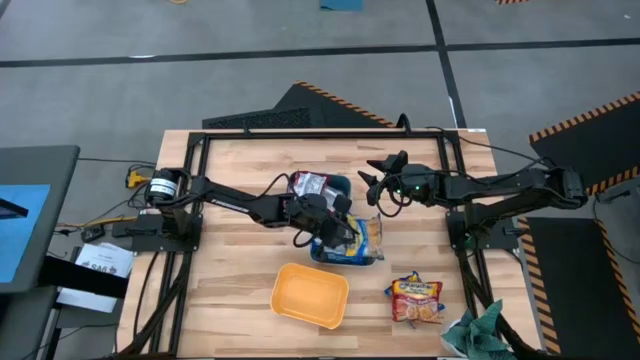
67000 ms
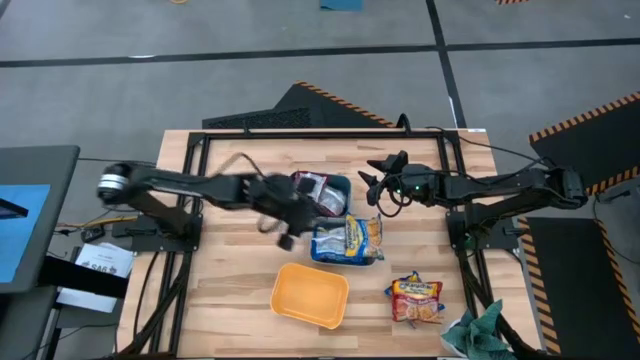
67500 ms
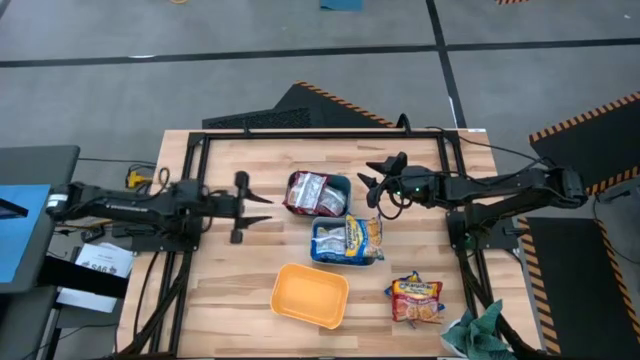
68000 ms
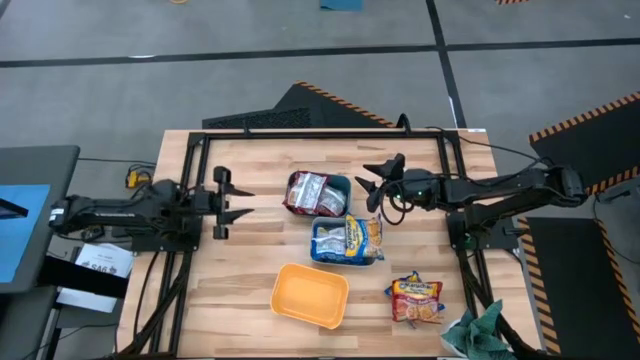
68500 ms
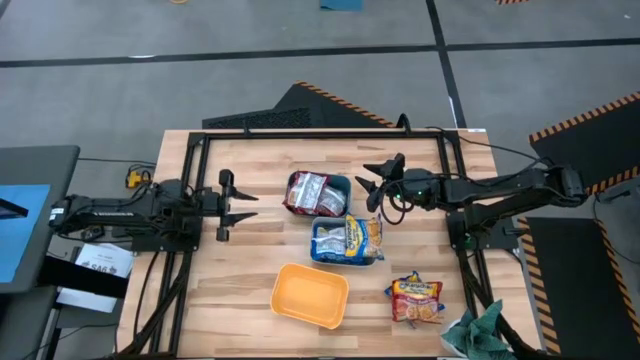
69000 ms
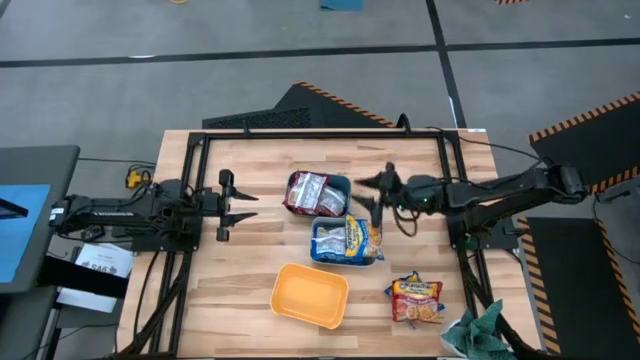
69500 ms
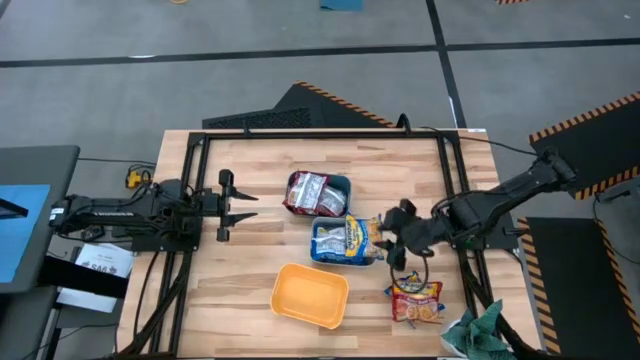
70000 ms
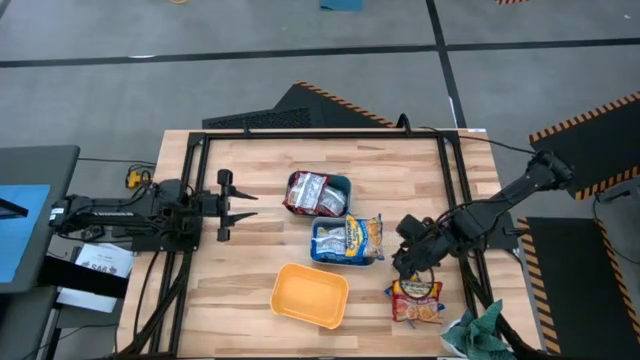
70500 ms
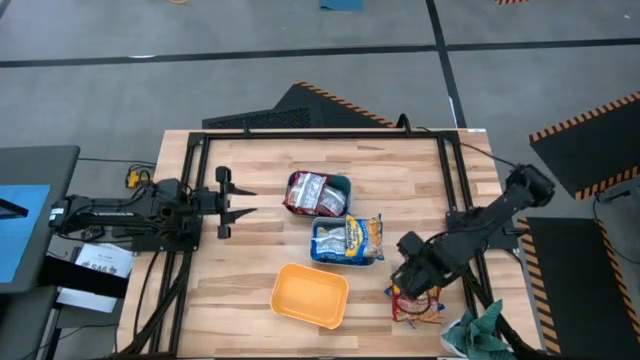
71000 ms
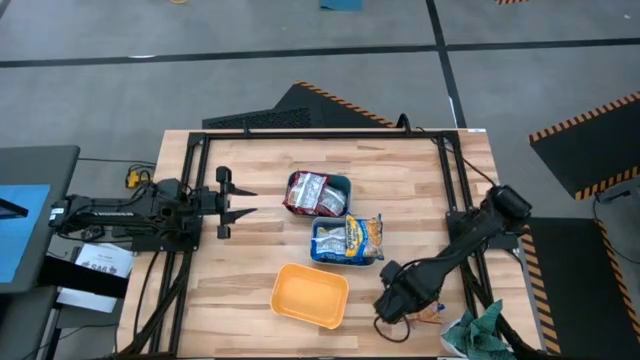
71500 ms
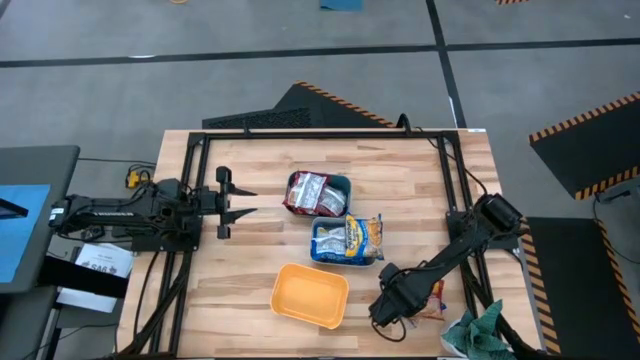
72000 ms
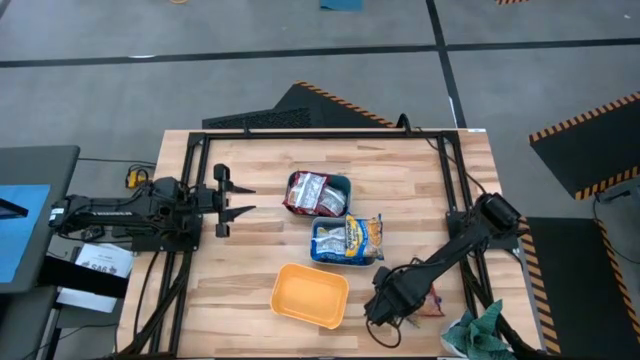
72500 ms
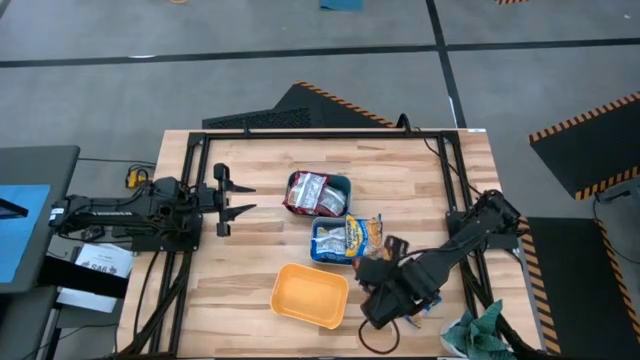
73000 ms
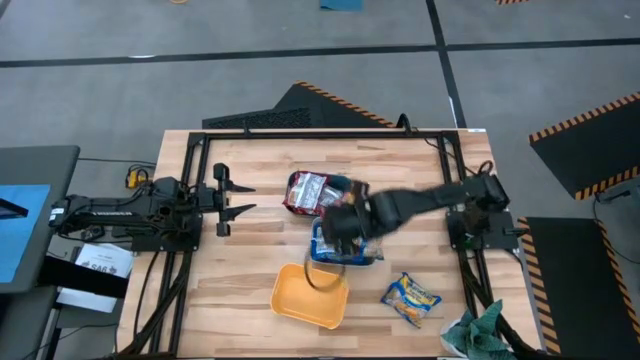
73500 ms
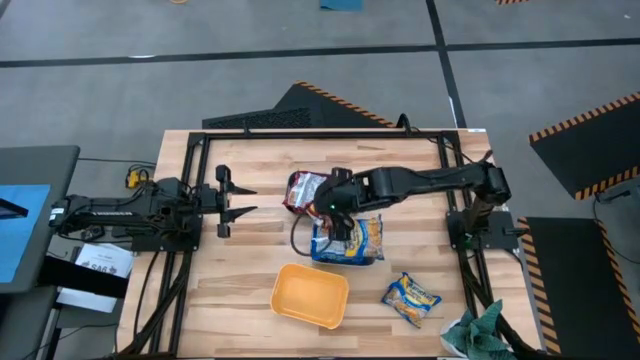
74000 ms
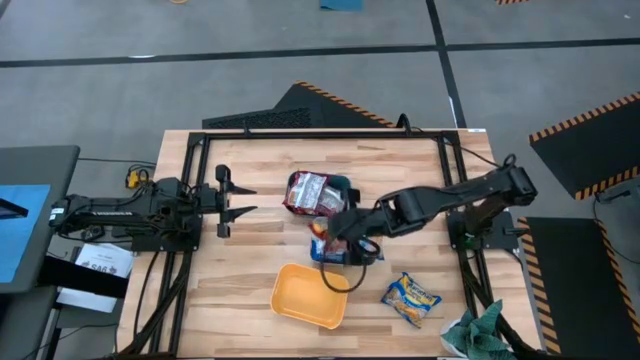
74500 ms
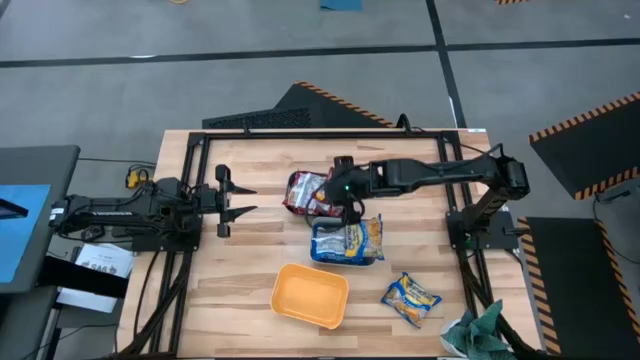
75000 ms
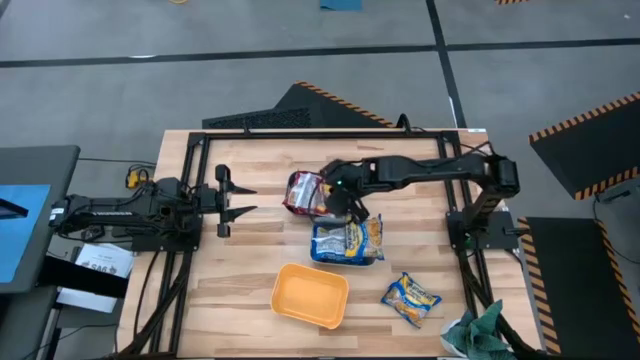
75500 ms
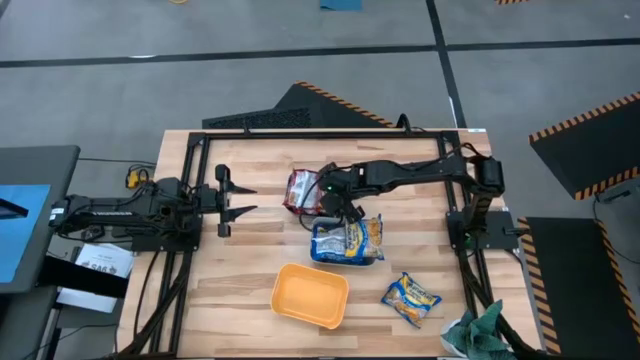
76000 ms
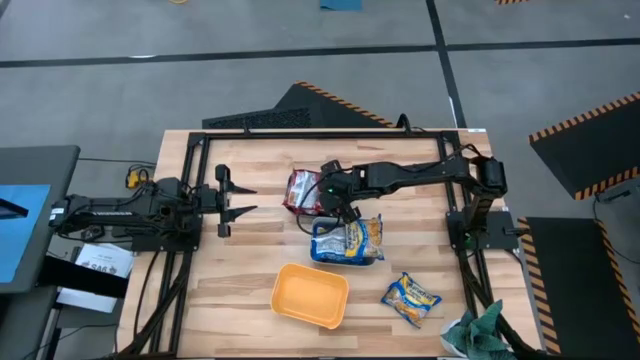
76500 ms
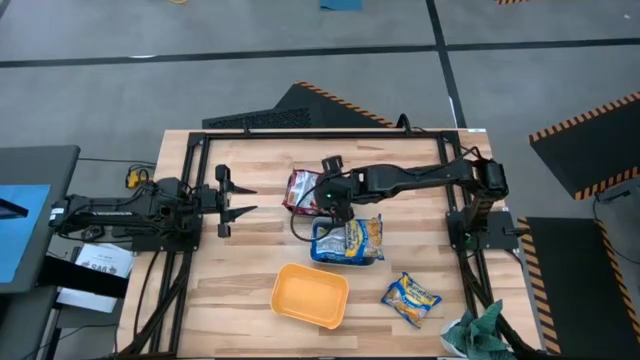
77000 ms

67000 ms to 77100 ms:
Task: Sort Maruchan noodles
Put the red noodle pack into the blue bin

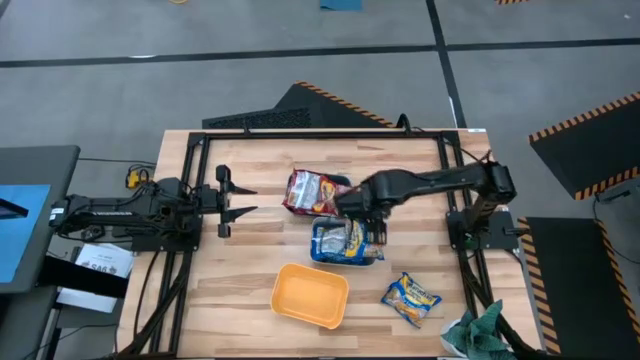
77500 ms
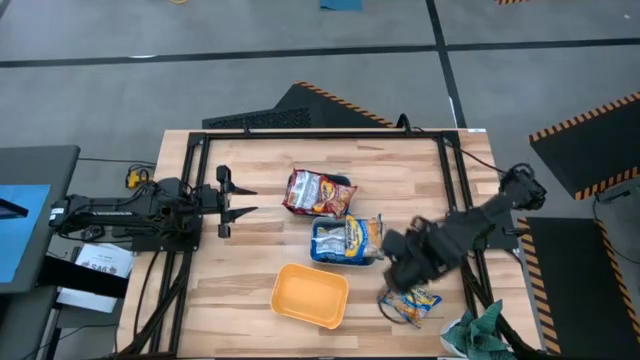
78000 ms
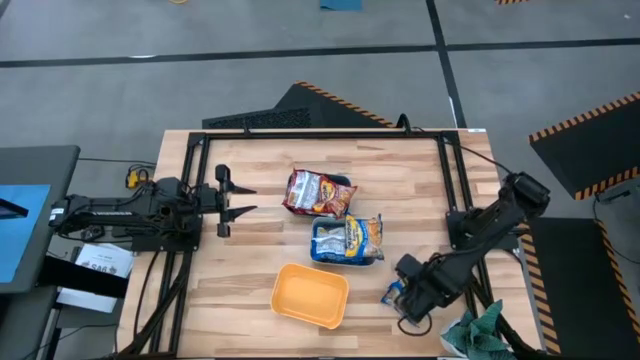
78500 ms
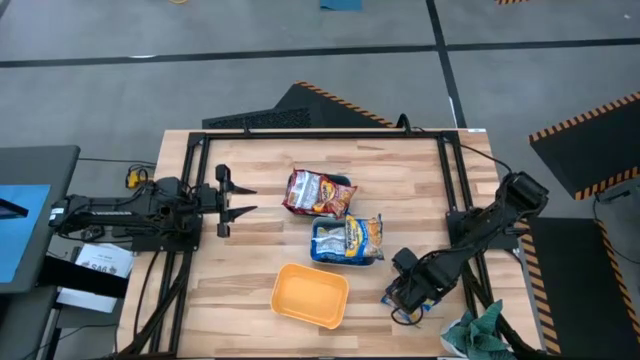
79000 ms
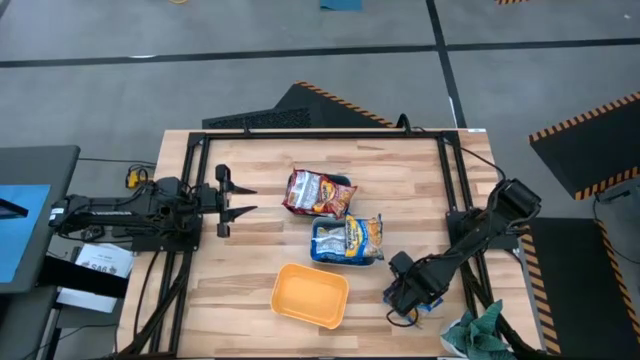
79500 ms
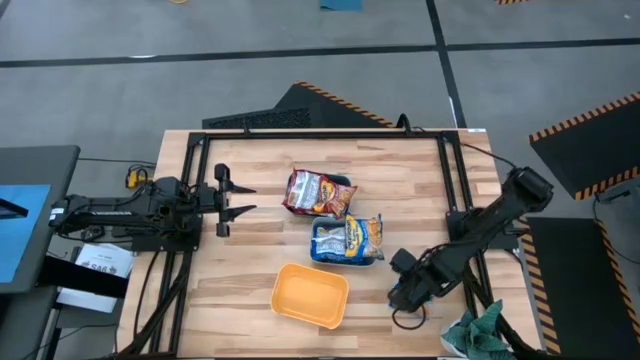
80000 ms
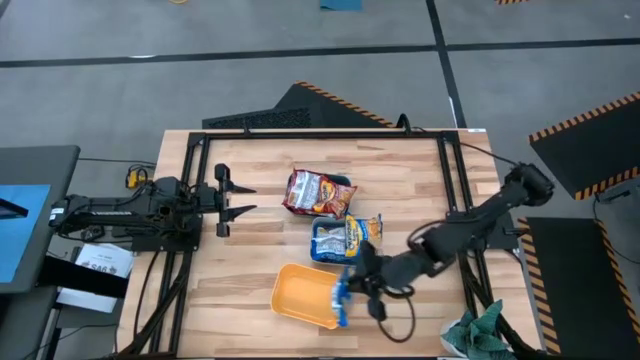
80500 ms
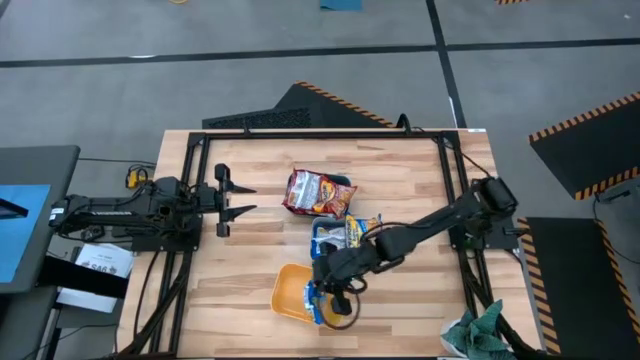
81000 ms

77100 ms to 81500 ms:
Put the blue noodle pack into the yellow bin

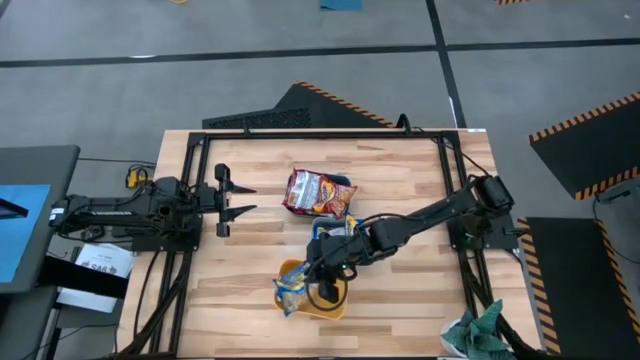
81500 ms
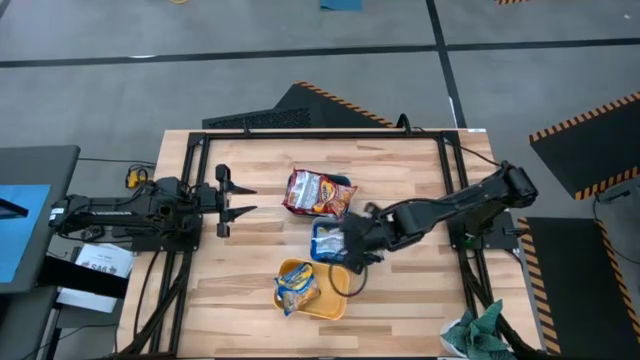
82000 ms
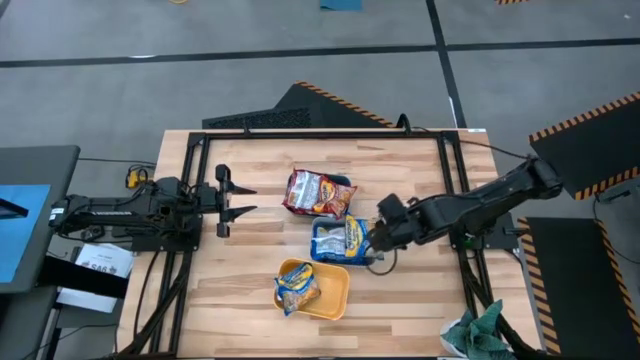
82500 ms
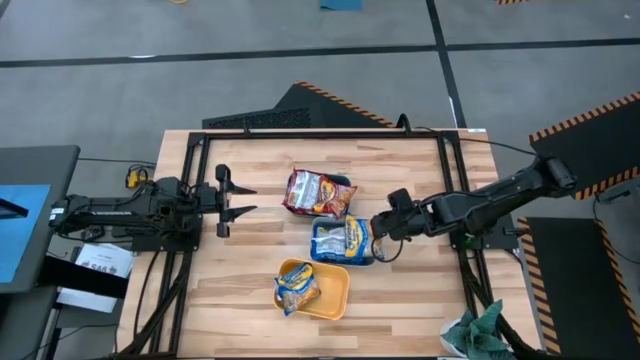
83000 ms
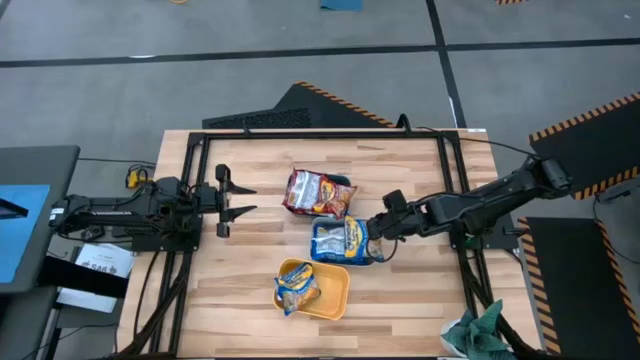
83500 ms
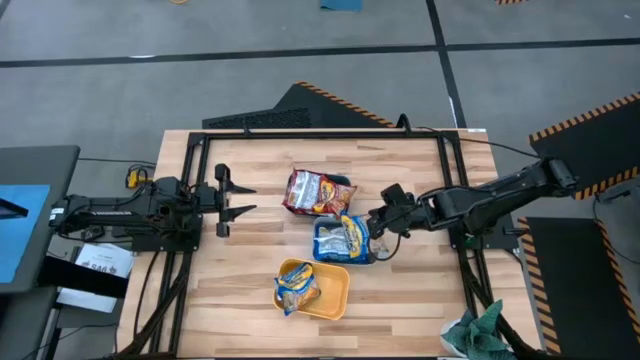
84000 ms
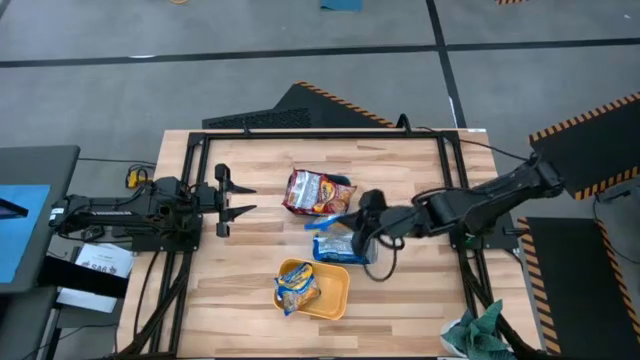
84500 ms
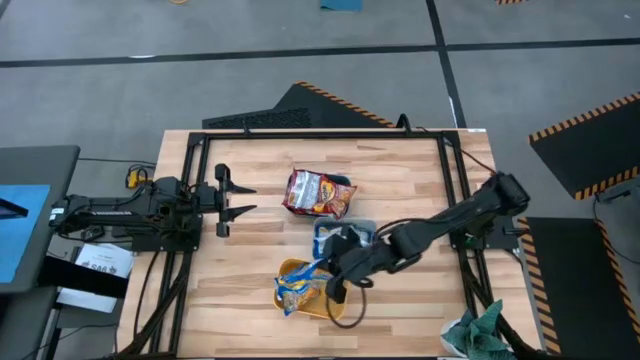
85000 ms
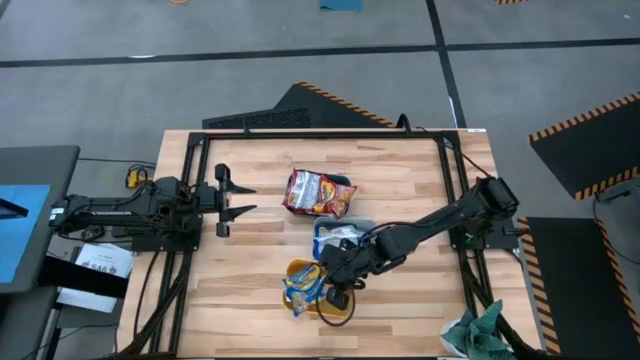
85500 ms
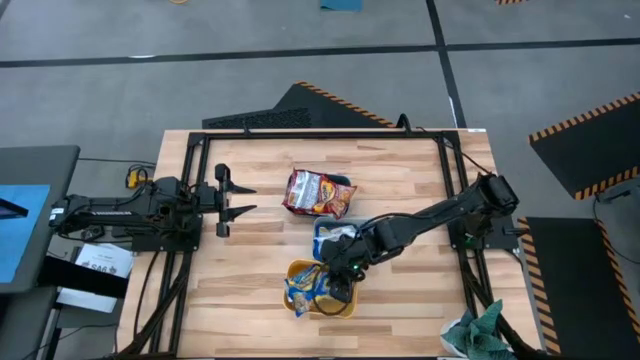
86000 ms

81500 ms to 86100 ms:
Put the blue noodle pack into the yellow bin

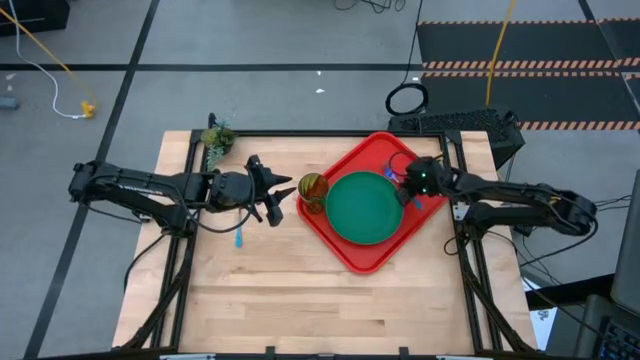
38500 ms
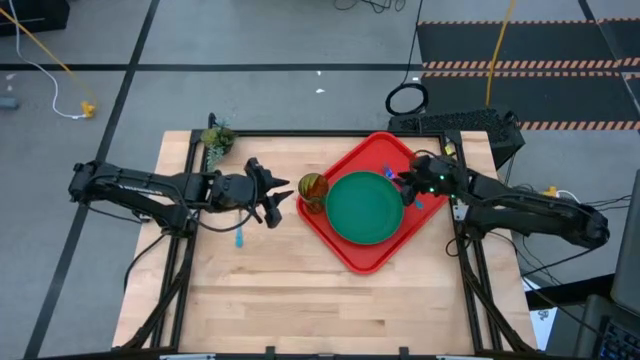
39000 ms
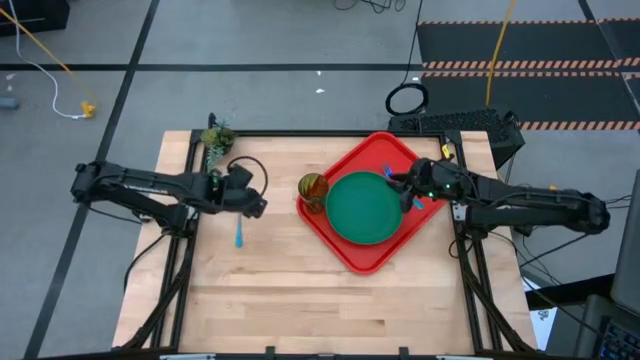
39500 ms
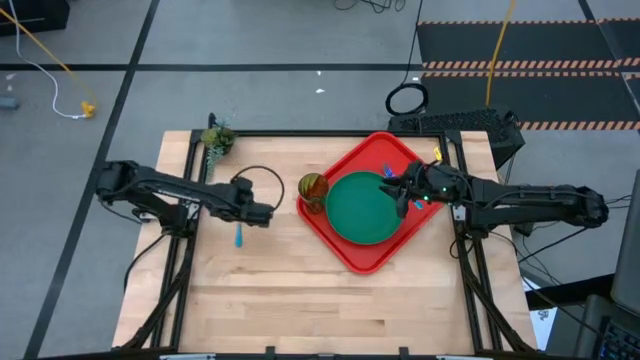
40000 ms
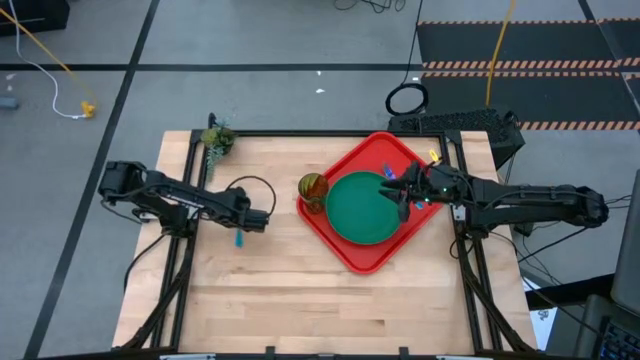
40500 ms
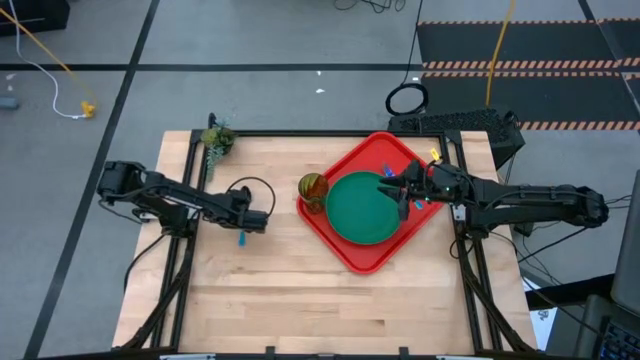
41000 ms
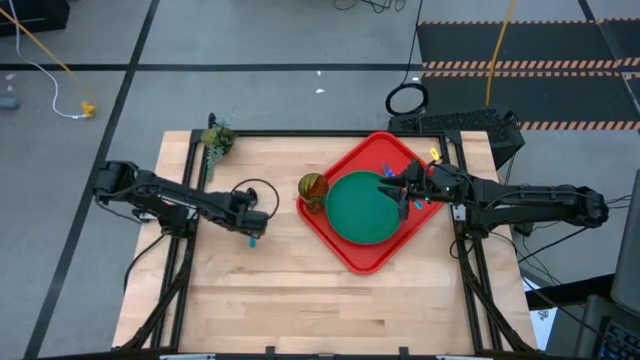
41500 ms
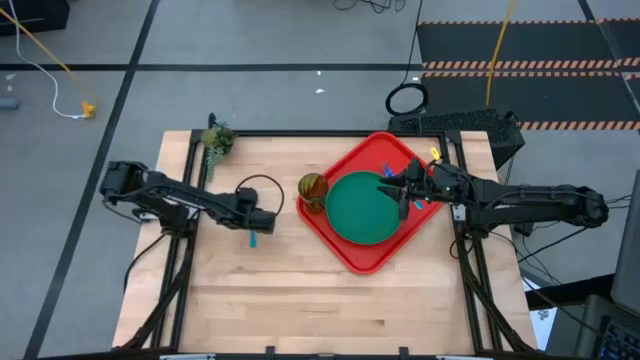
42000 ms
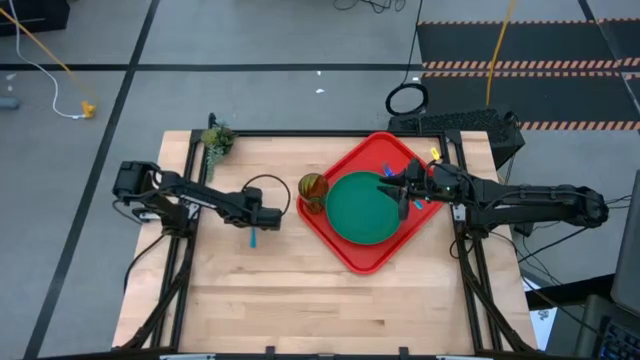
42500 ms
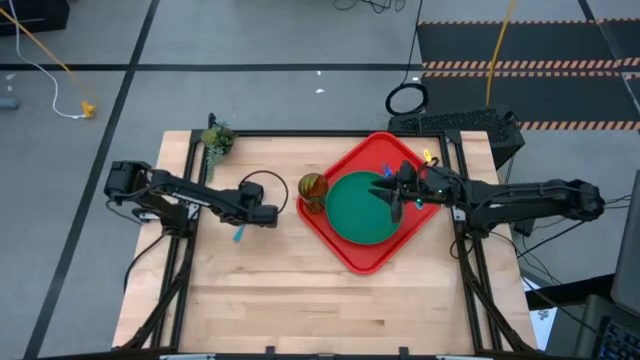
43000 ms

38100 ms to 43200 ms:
Task: Pick and place plate/cup/fork/spoon on tray
Put the blue spoon on the red serving tray
